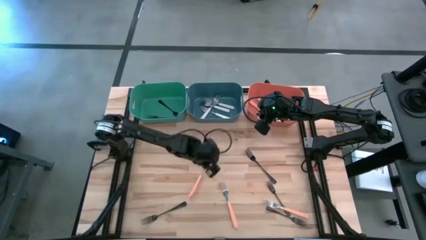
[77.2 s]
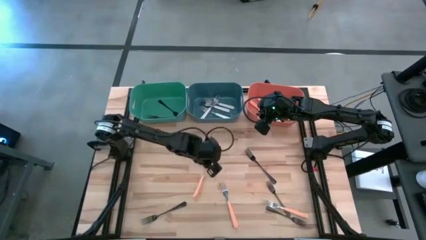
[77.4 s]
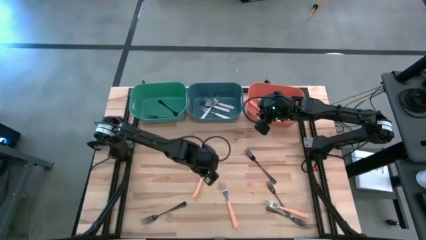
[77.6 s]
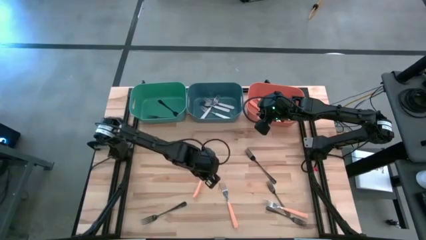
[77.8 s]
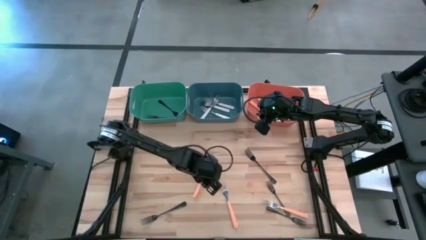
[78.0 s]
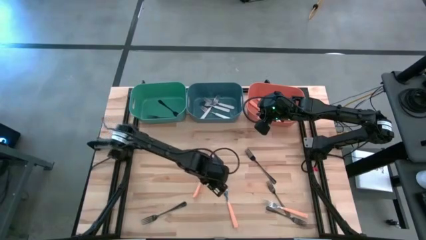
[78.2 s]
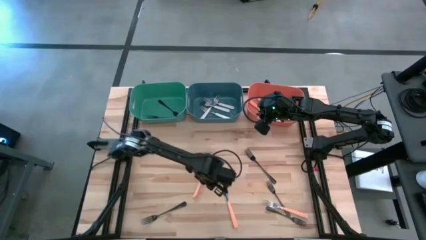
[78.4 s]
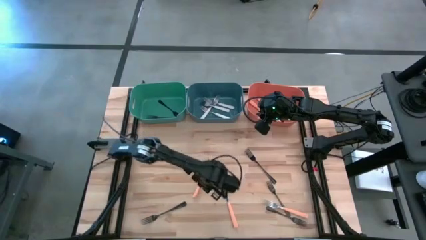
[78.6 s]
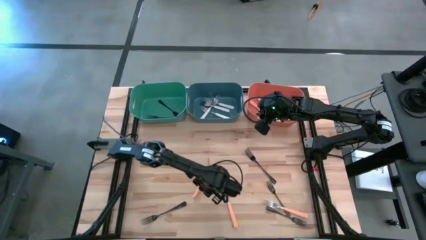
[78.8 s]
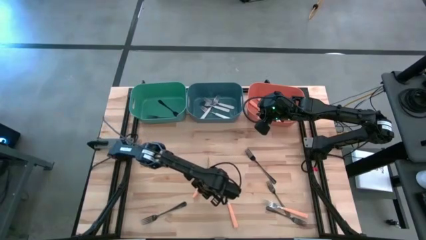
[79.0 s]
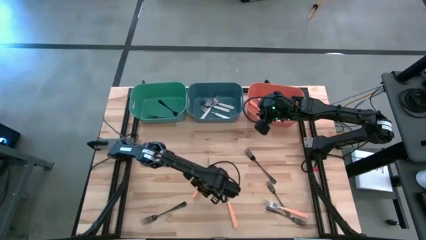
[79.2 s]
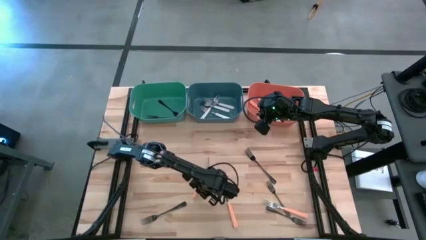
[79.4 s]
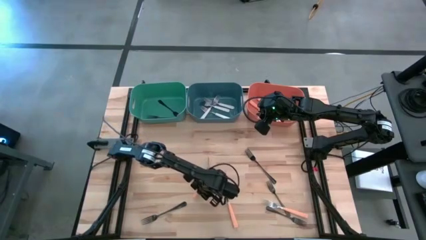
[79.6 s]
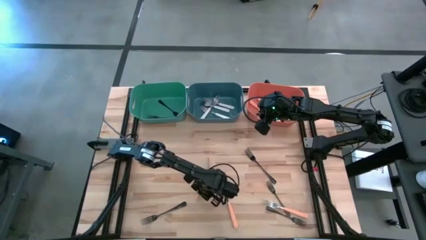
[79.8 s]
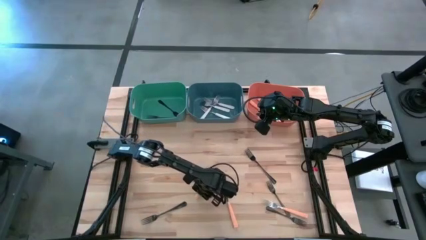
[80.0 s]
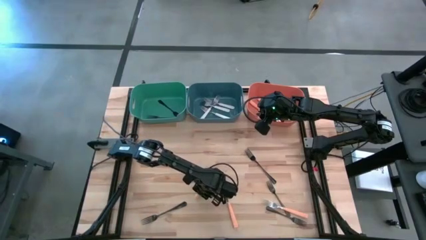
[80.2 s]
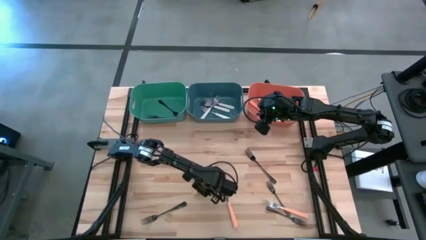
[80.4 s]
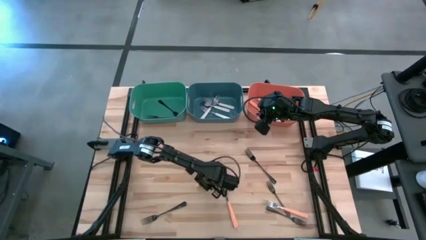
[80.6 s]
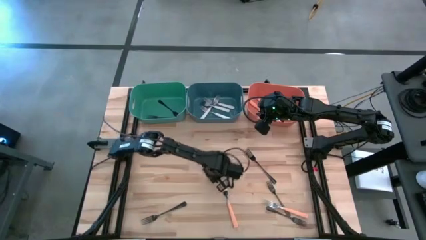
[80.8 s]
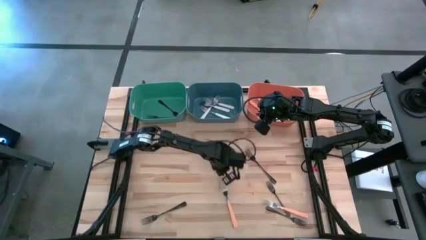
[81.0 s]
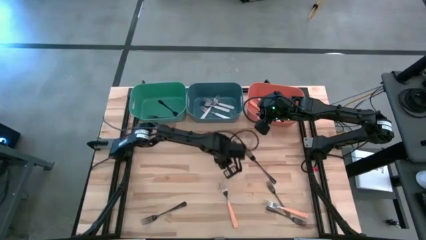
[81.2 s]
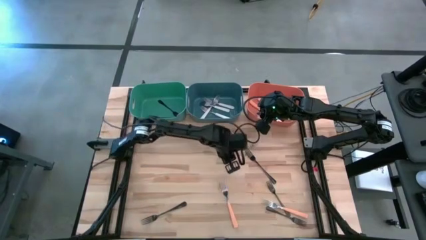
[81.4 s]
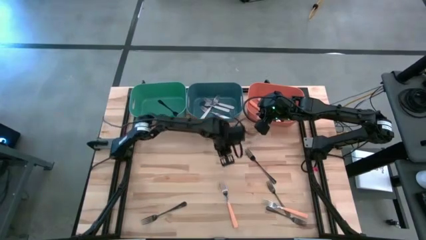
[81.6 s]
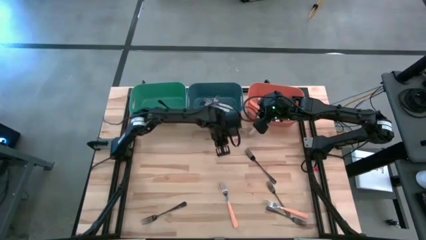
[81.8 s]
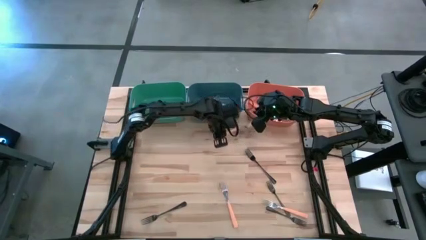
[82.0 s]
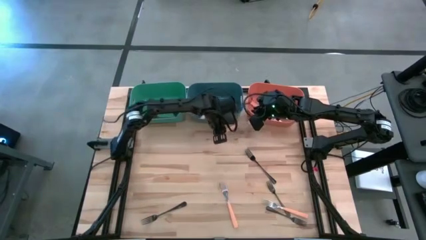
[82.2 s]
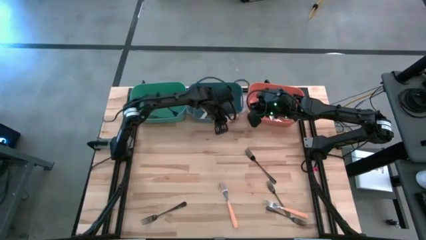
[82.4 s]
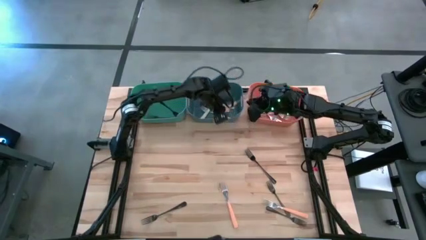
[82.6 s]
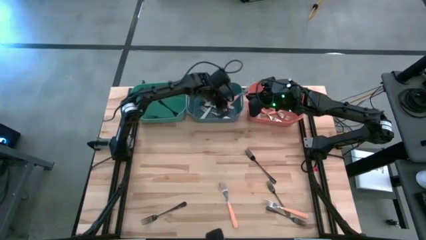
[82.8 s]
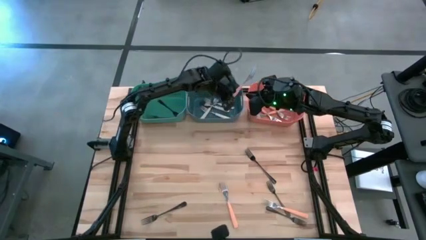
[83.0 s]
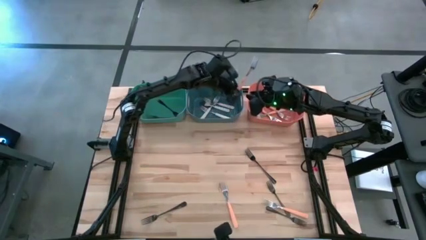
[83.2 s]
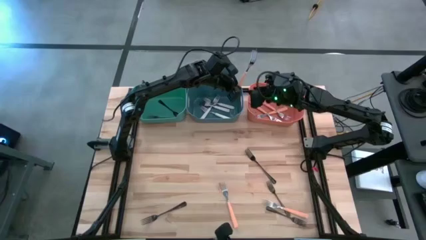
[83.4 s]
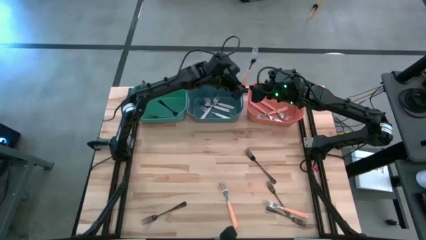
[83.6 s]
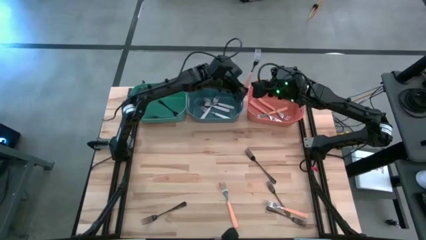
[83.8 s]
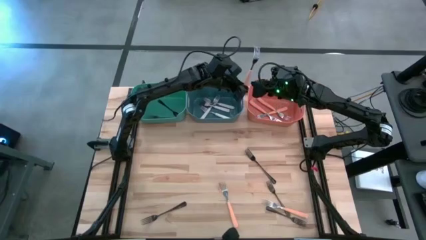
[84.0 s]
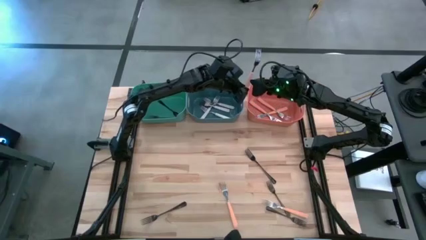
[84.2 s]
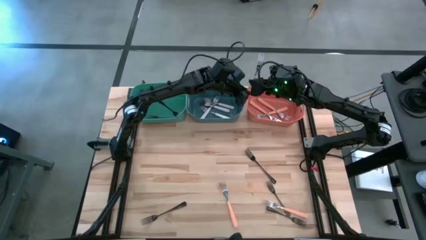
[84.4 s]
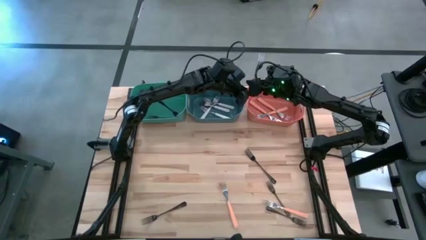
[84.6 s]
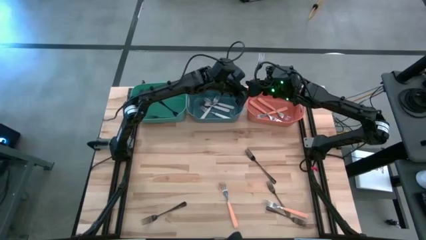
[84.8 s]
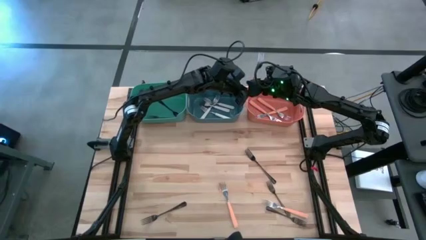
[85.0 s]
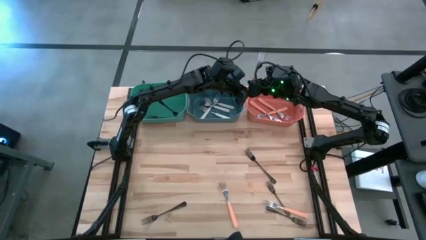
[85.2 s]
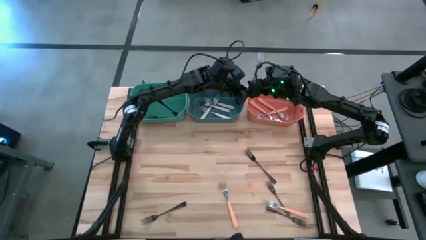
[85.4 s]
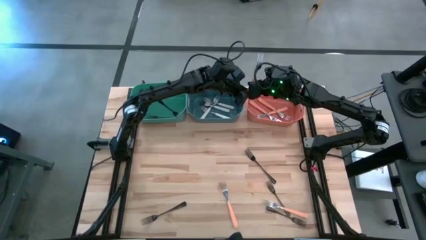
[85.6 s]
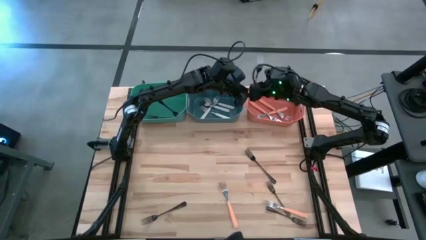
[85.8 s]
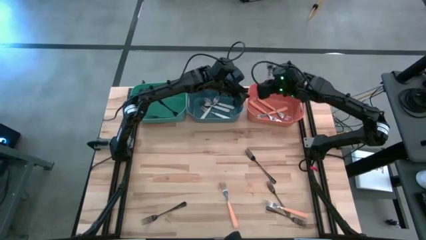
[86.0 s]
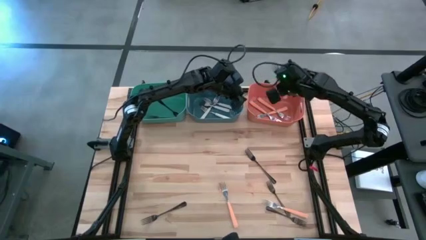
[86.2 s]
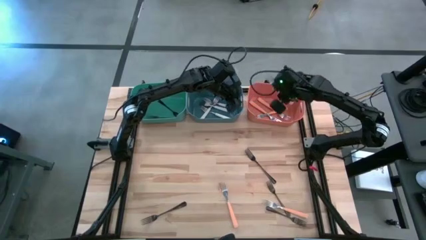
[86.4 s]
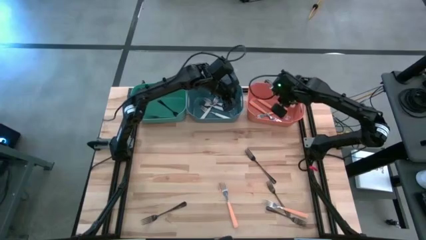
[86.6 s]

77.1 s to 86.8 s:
Task: Sort silverware by color (type)
Put the orange fork into the orange bin

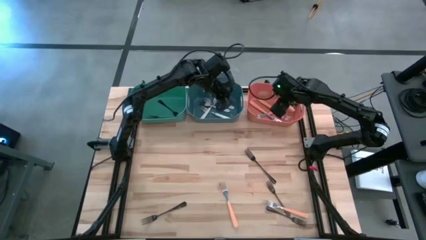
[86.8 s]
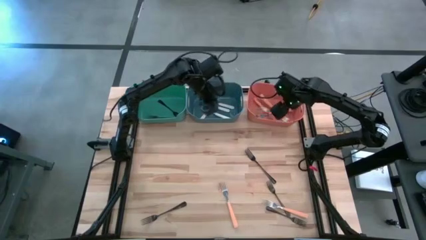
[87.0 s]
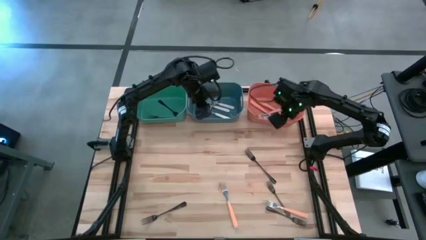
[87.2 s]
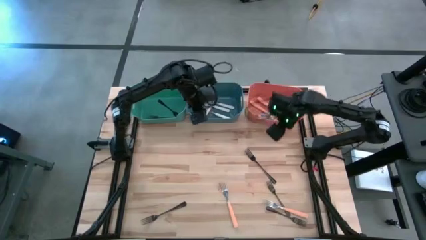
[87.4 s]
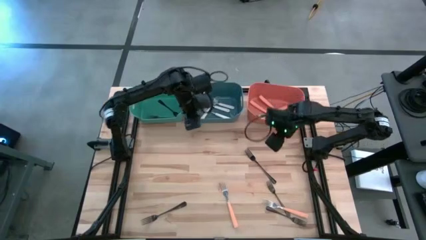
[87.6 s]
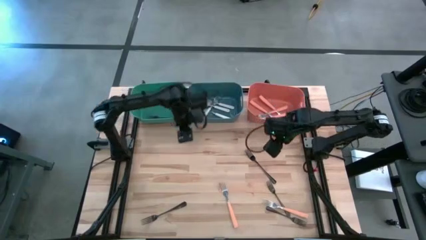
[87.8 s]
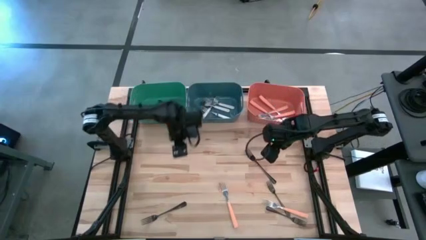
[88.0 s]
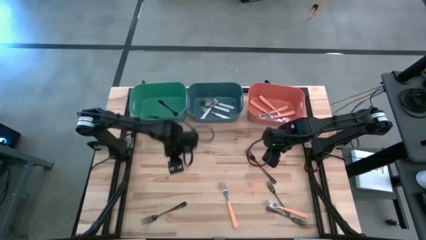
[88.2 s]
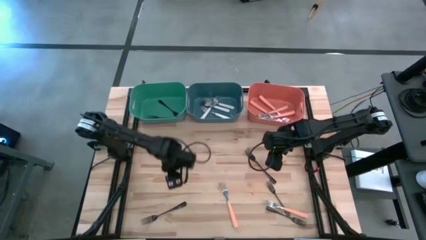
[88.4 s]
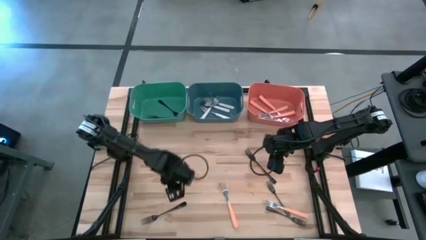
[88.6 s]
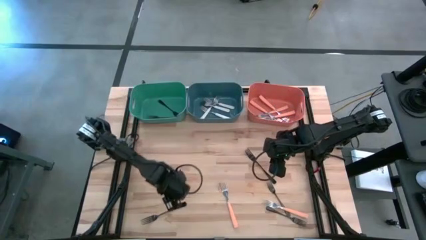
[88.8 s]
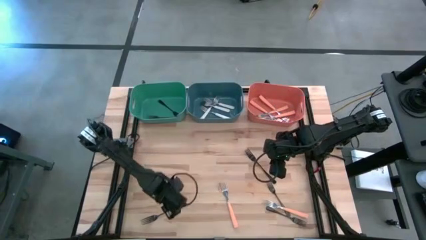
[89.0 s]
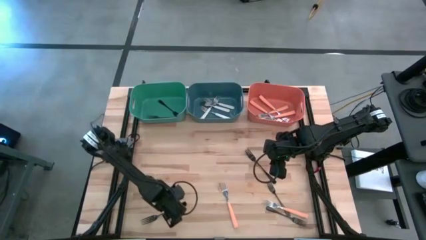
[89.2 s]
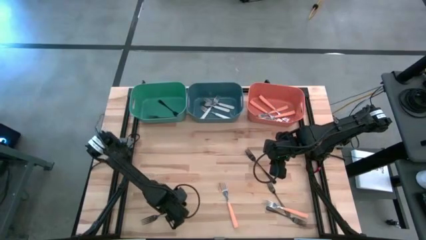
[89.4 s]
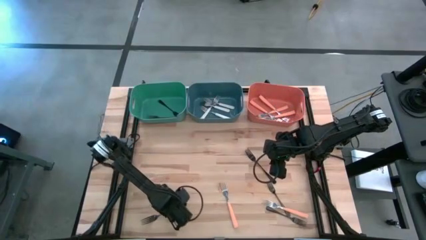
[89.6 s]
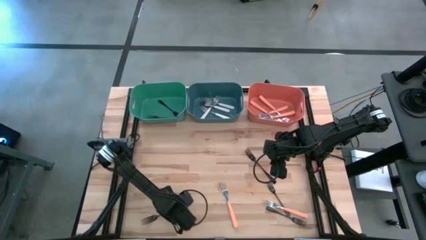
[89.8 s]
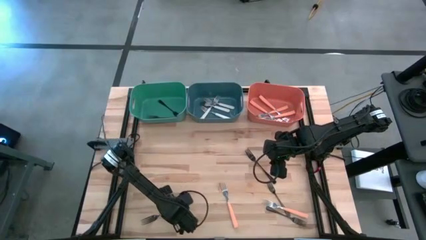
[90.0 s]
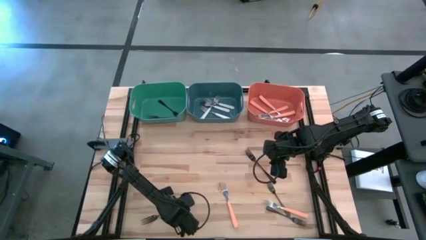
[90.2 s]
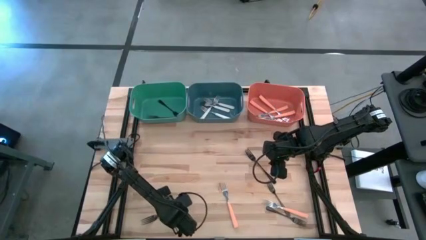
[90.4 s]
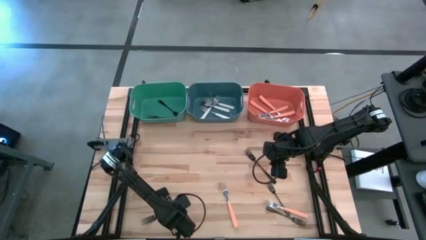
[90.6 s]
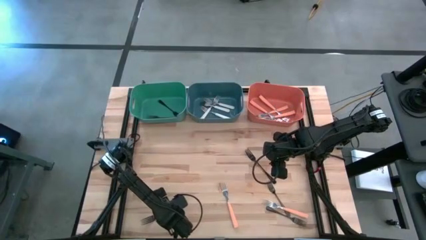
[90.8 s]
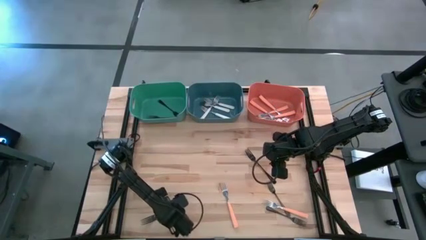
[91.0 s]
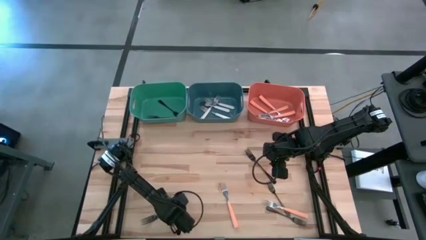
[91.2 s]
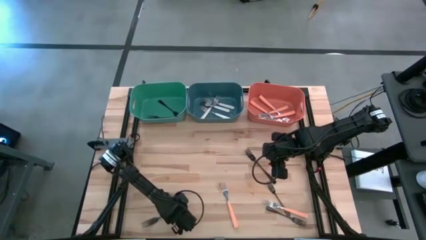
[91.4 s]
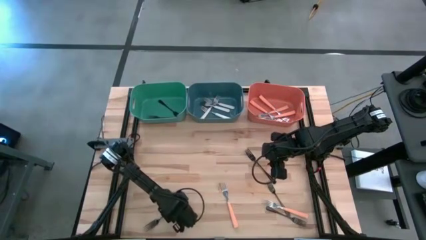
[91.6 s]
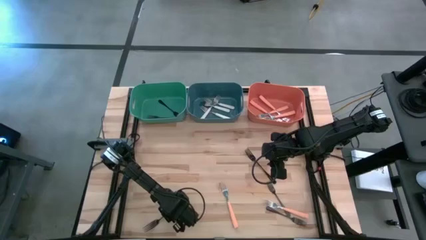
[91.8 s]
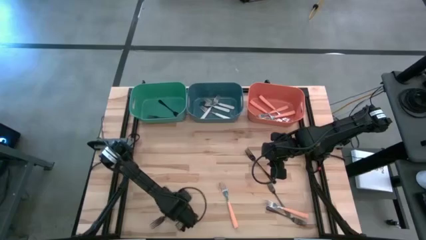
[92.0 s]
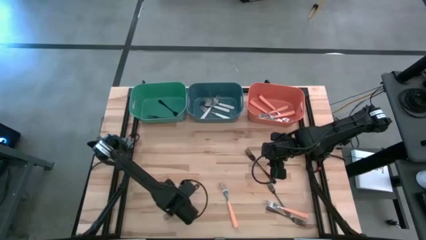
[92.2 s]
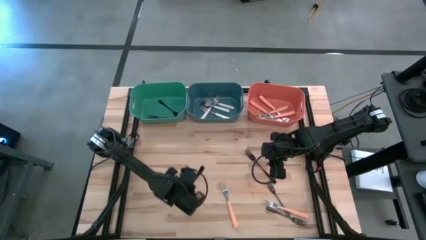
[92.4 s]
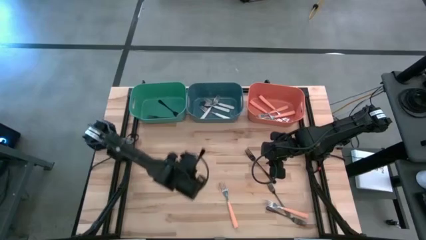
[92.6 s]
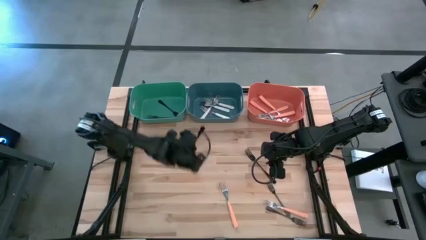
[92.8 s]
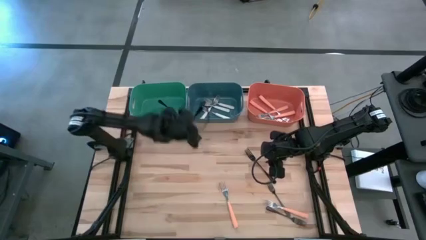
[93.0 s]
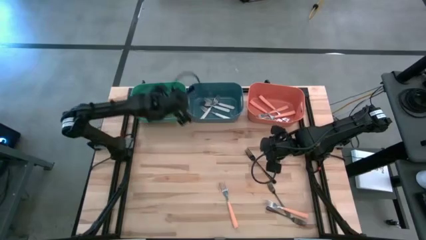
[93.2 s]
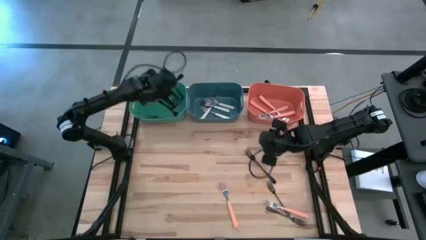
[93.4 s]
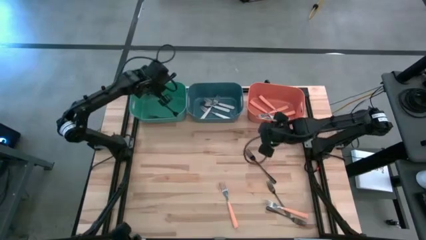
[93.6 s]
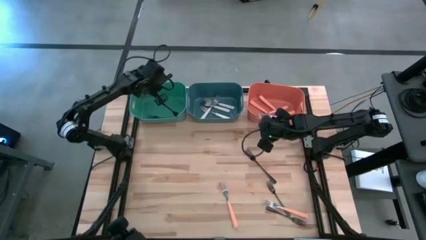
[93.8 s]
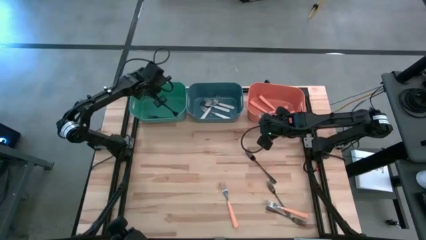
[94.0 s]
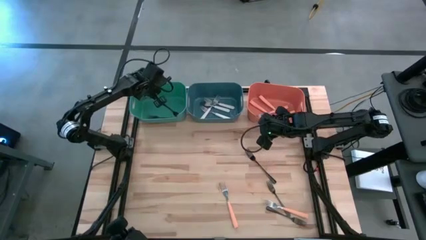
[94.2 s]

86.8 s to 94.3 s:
Put the black fork into the green bin
